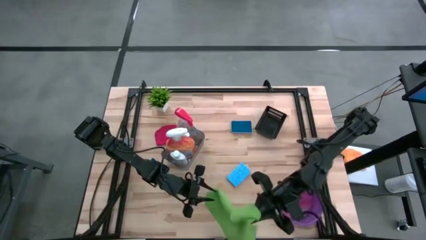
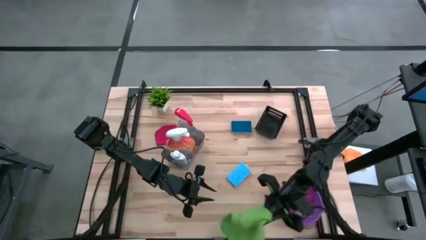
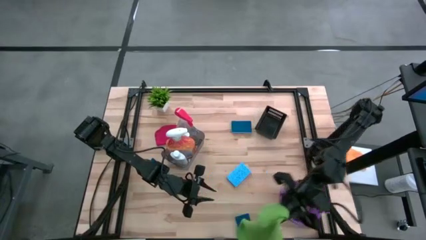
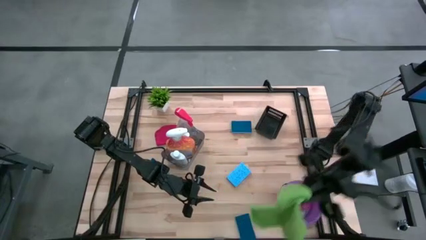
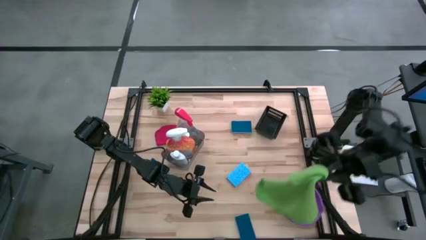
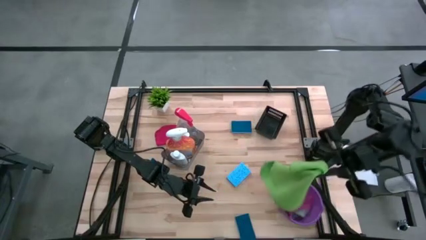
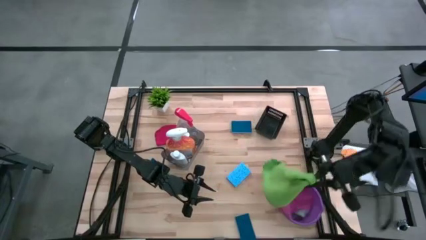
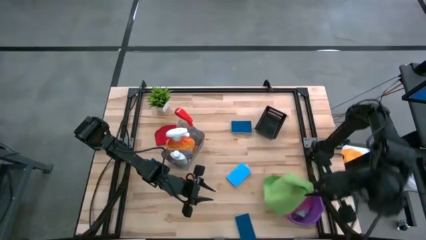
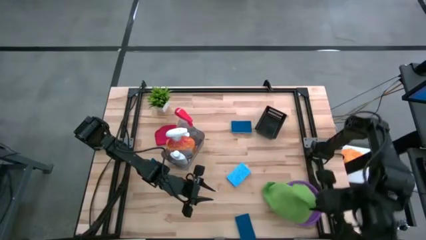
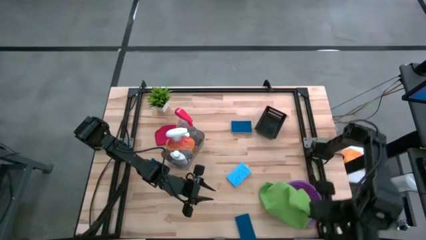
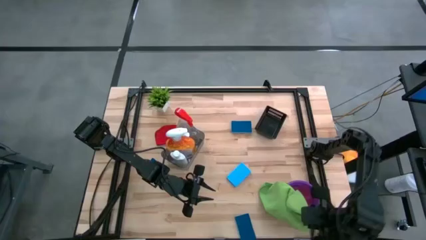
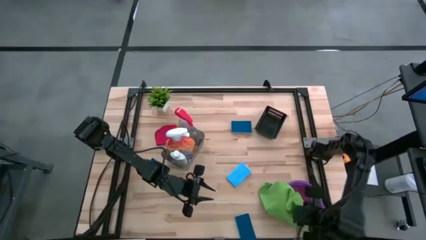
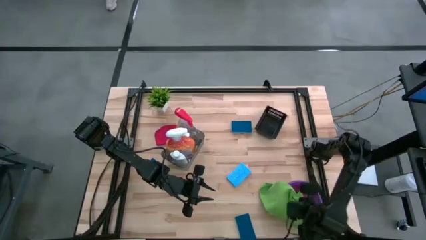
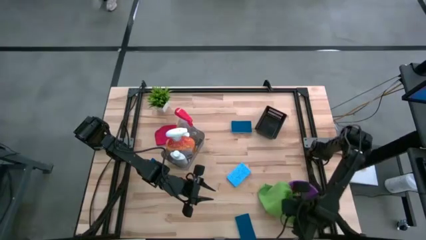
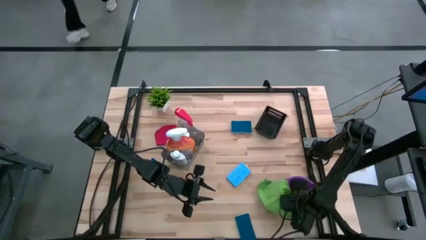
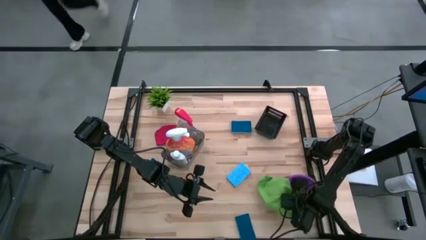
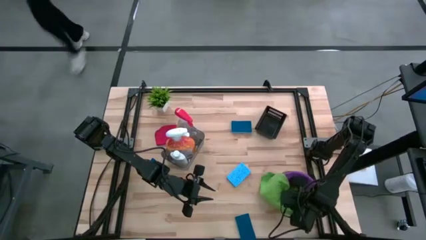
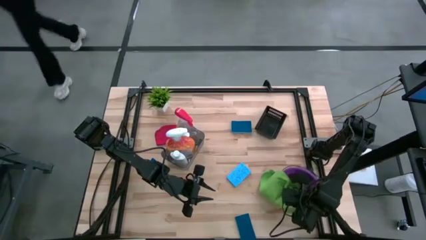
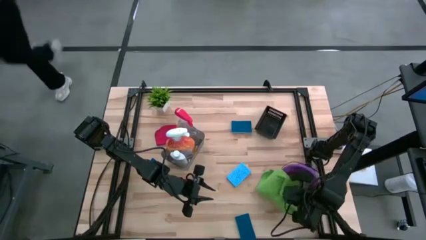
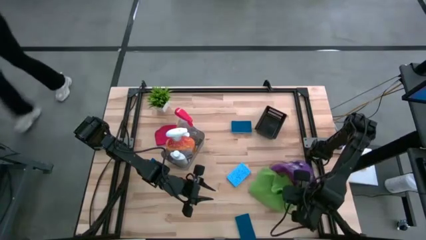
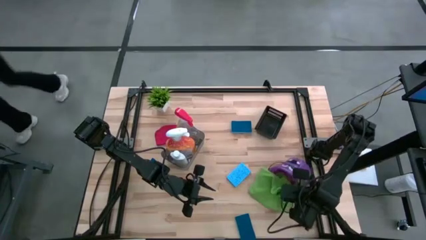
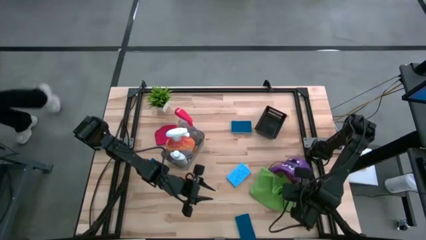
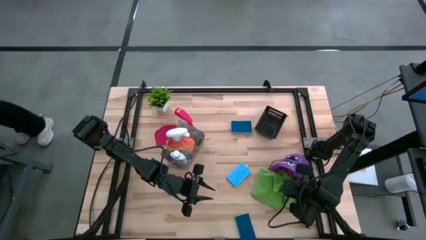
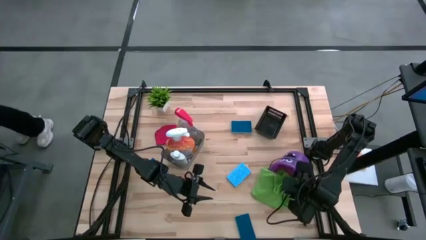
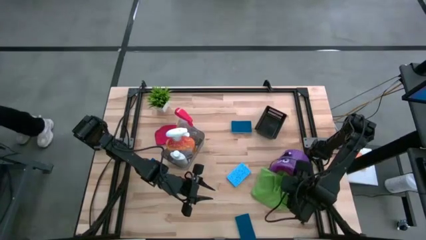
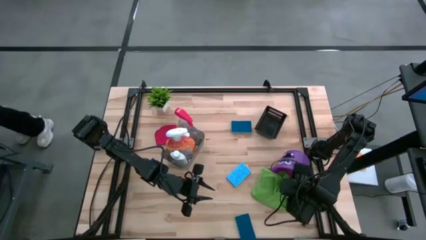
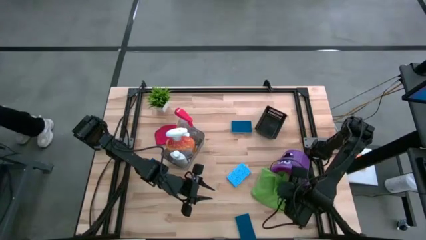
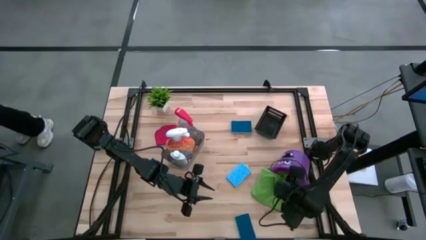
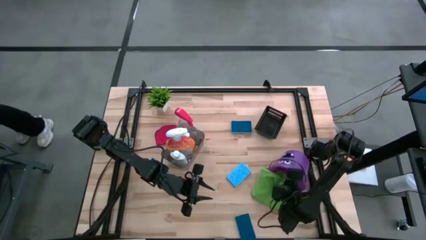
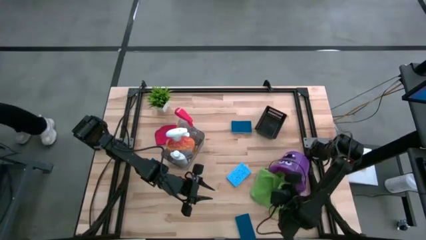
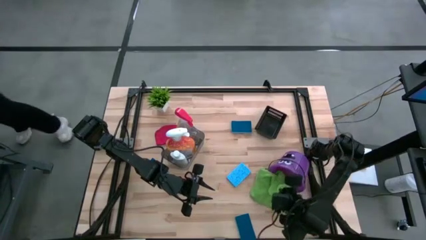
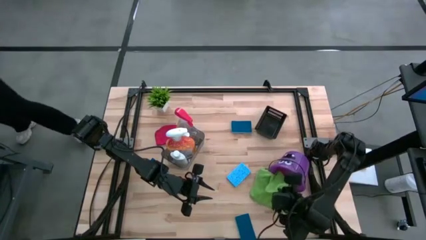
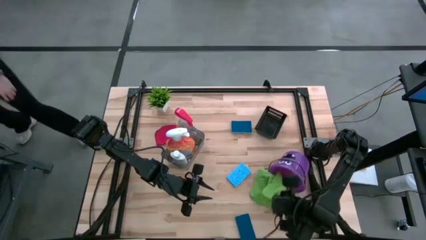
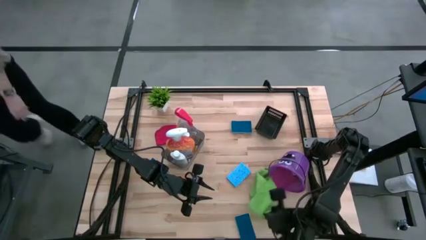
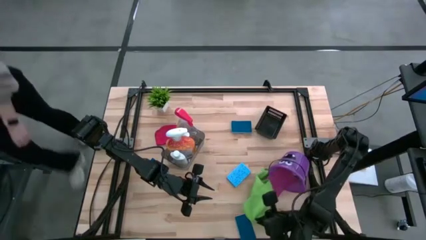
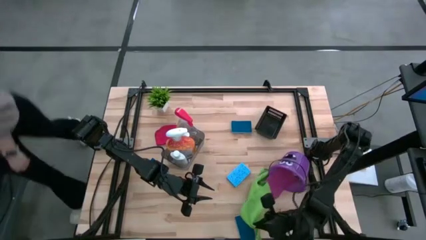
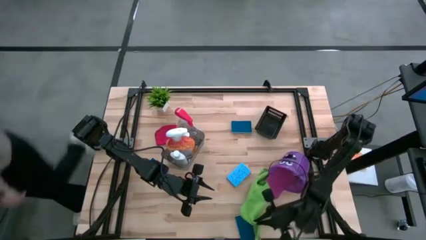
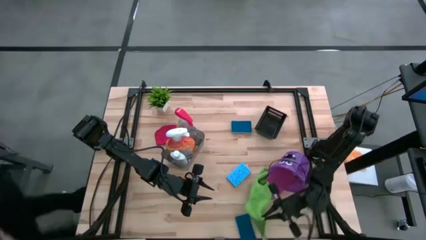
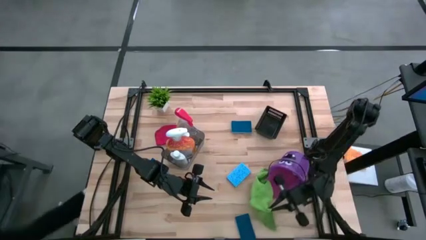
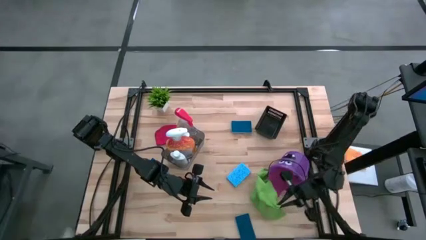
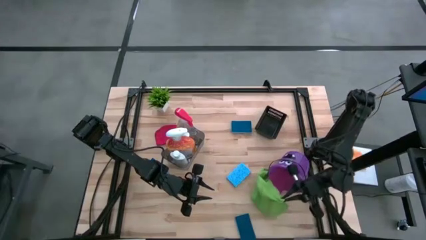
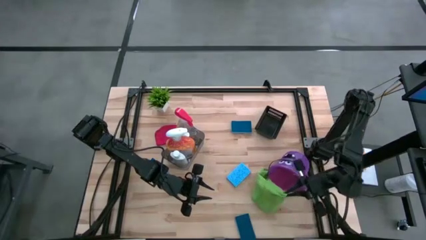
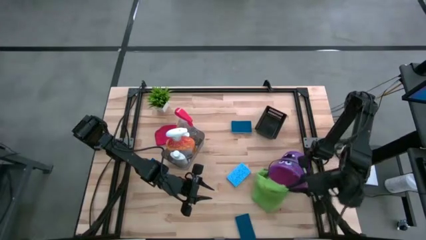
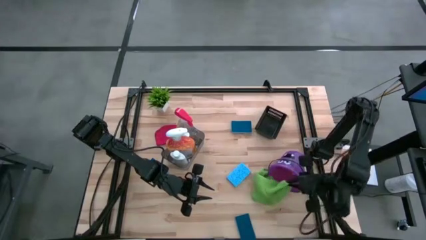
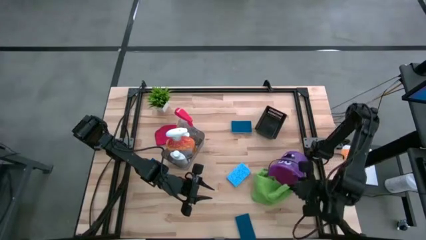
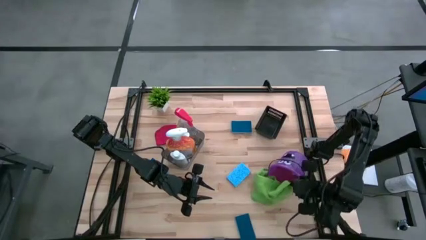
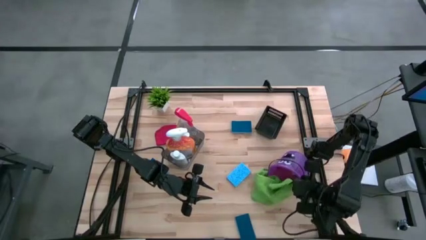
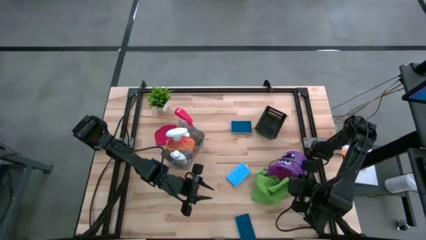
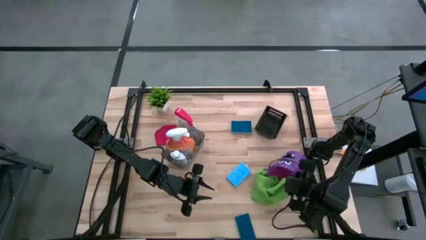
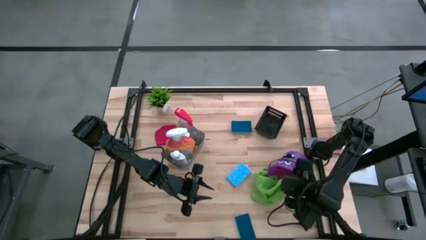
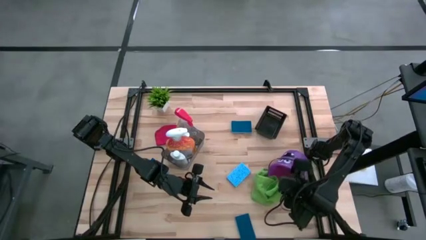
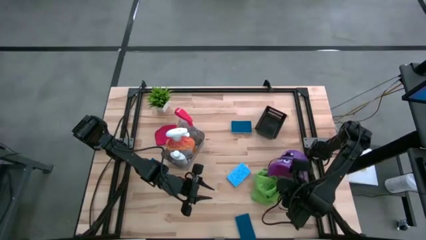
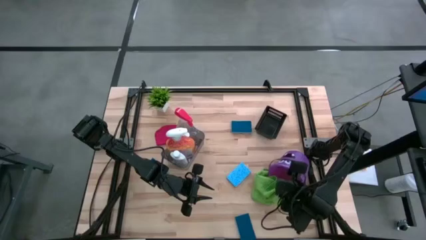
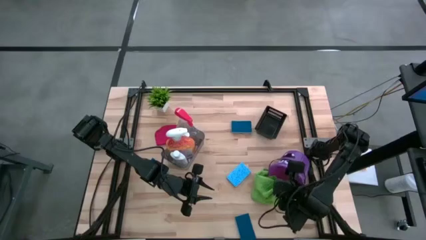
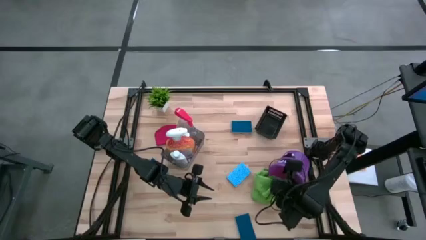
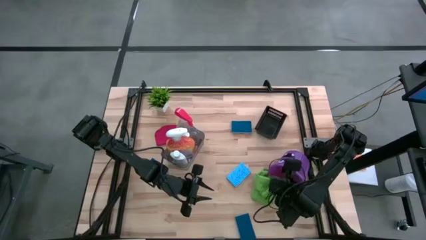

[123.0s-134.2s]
Task: Pick & Place Kitchen Items
Put the green microfiber cloth into the purple bucket

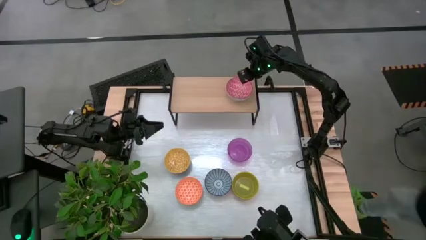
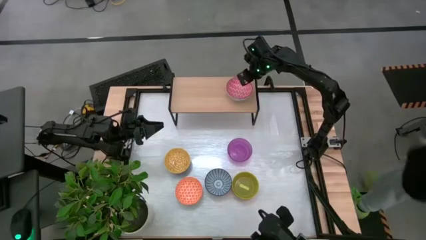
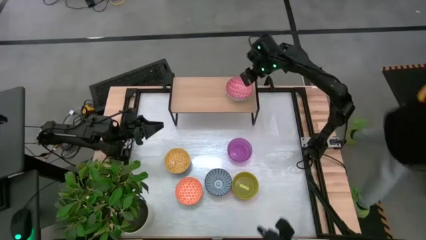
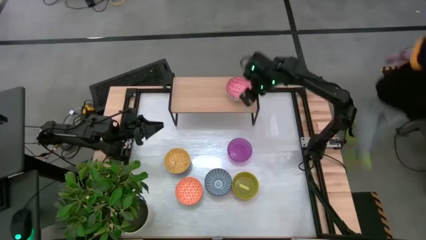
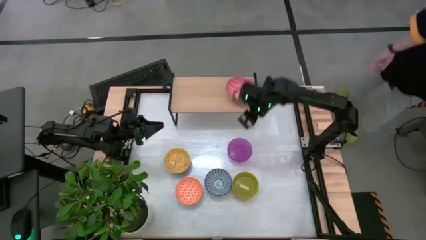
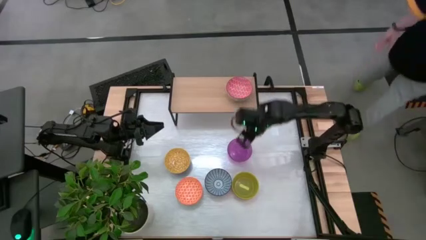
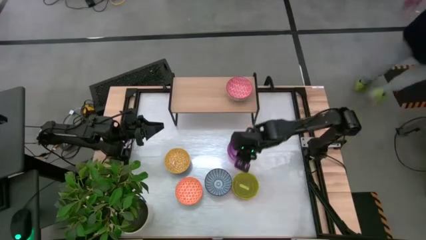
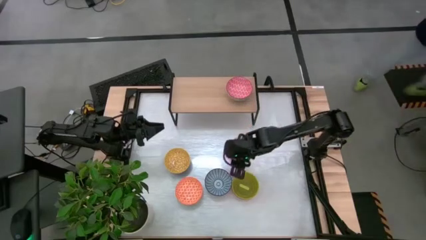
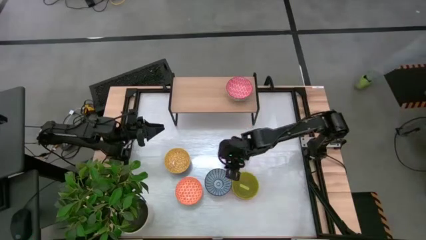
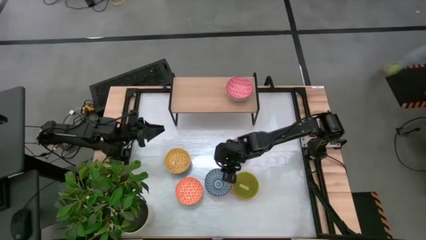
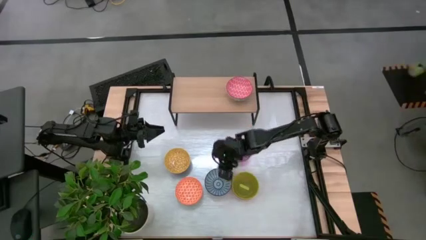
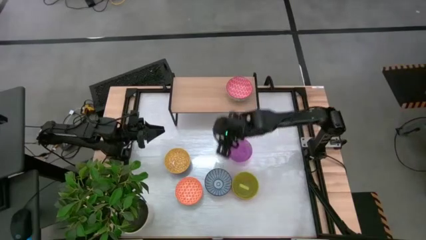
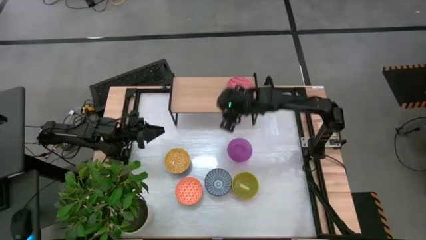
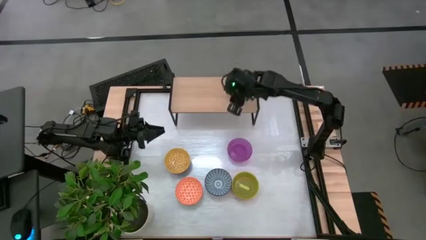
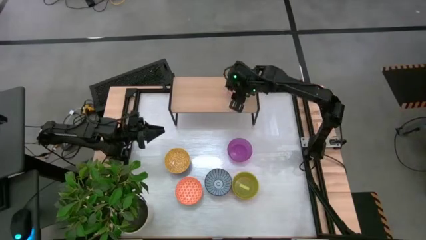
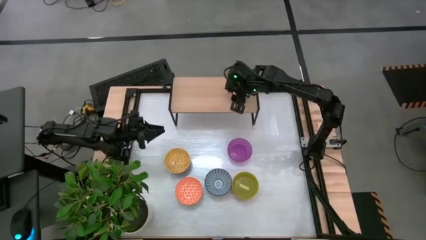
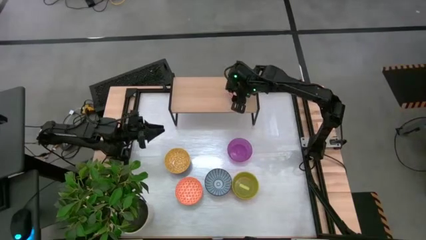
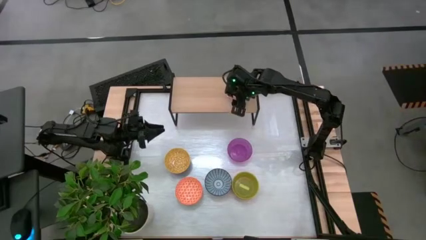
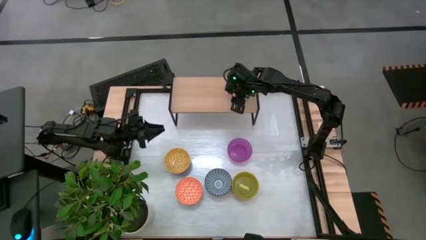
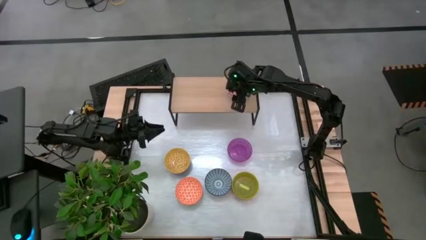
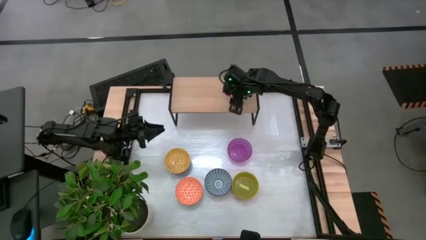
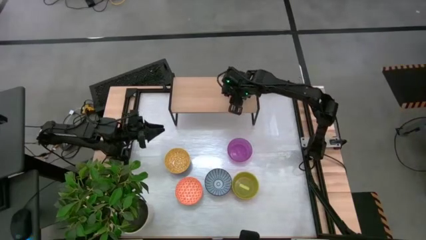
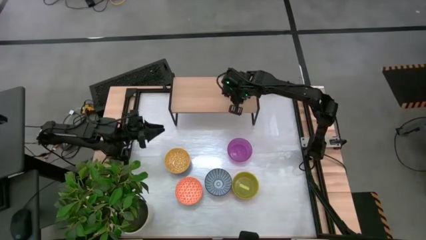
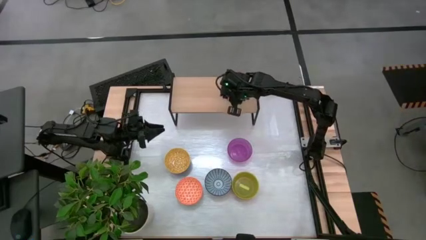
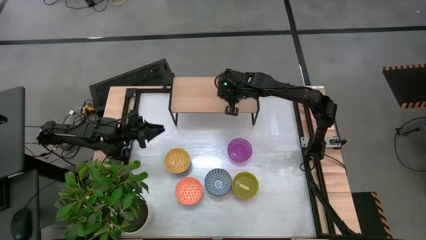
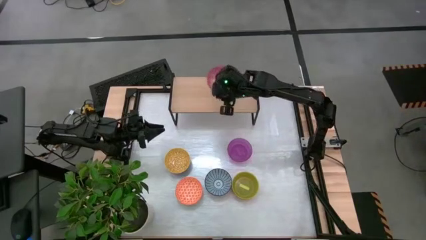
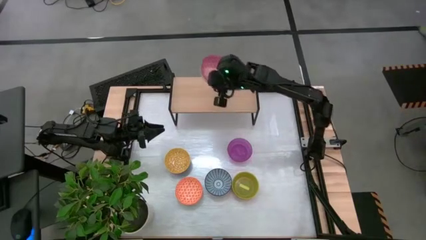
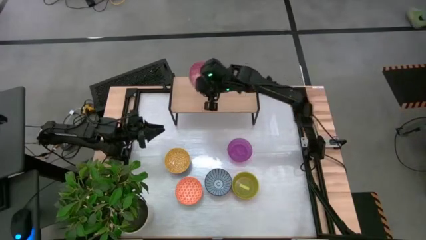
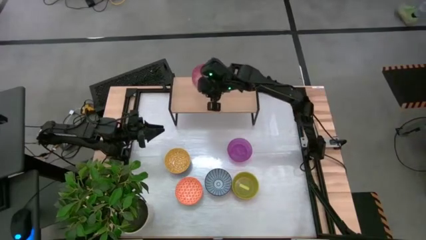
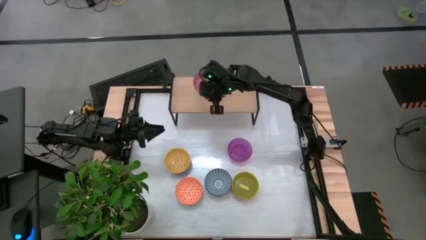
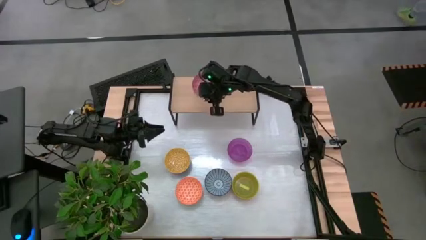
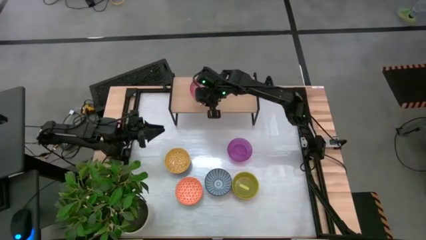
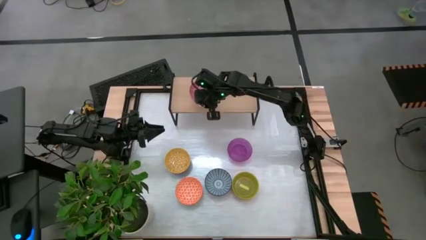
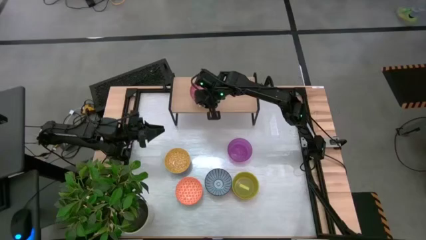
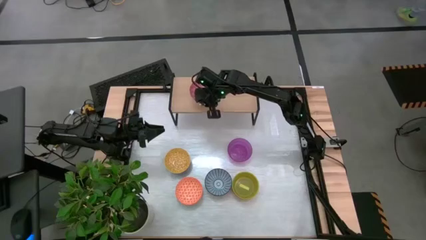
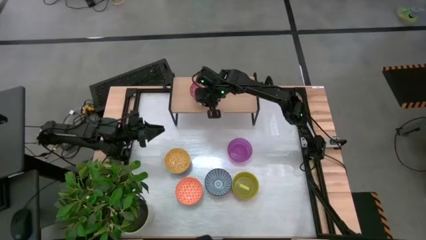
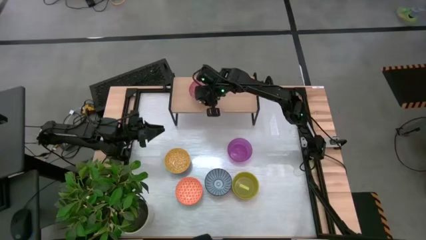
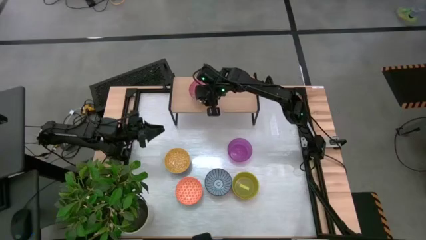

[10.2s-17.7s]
Task: Place and stack bowls onto a shelf
Move the red patterned bowl to the left side of the shelf slightly
